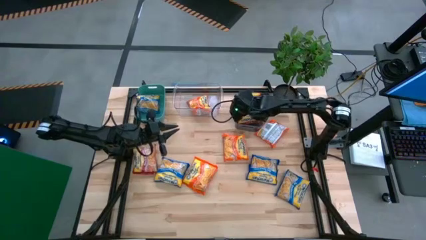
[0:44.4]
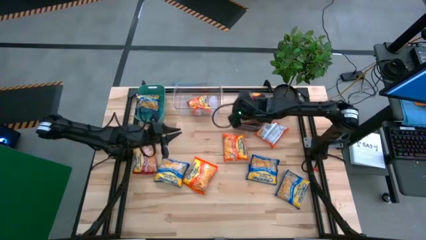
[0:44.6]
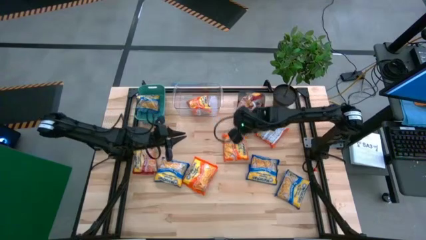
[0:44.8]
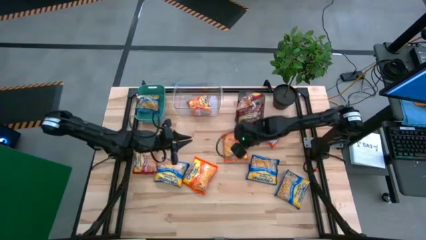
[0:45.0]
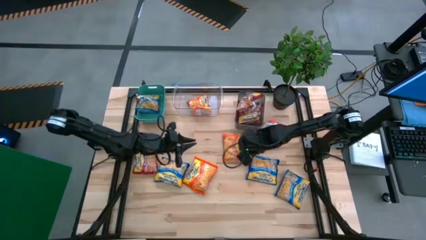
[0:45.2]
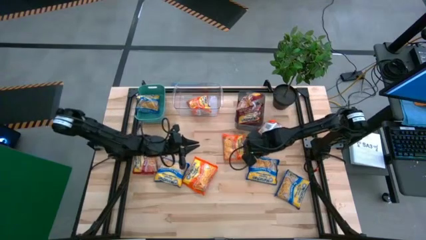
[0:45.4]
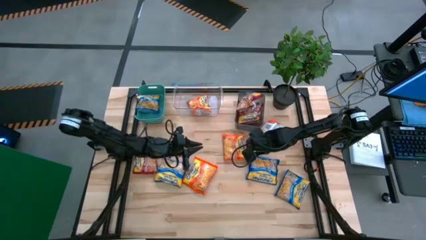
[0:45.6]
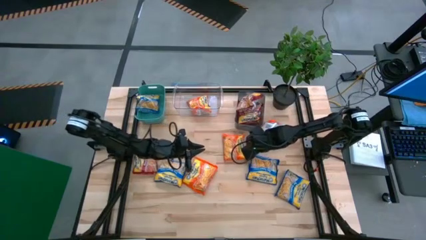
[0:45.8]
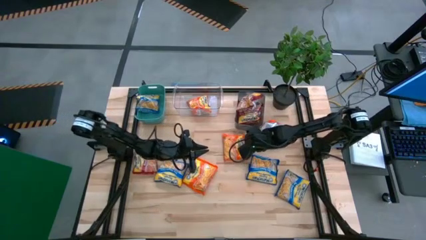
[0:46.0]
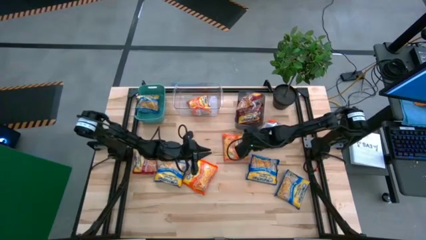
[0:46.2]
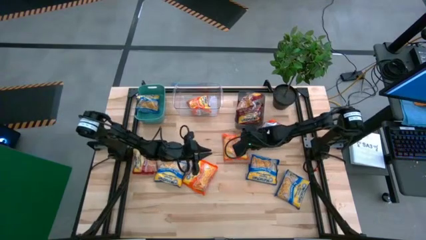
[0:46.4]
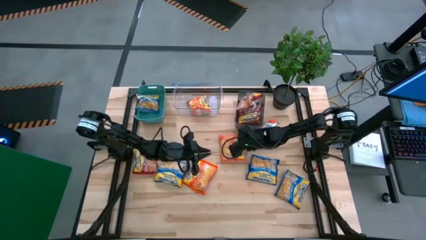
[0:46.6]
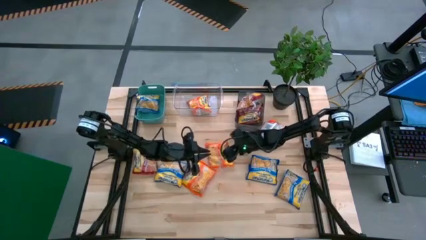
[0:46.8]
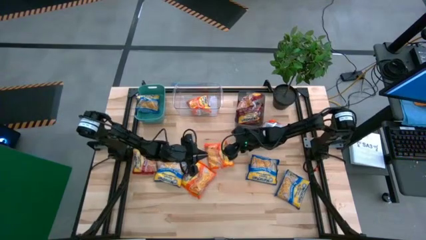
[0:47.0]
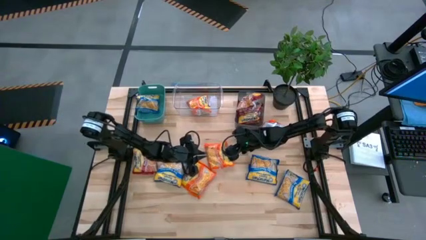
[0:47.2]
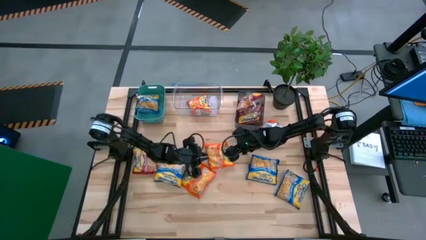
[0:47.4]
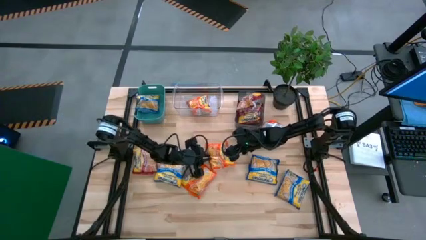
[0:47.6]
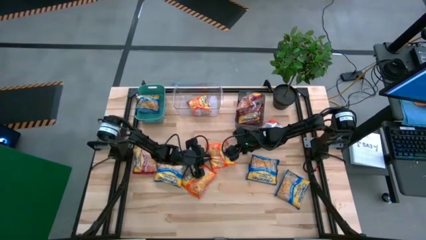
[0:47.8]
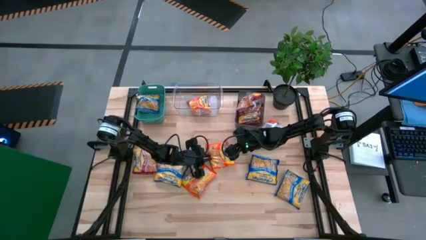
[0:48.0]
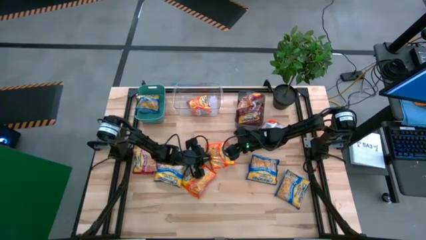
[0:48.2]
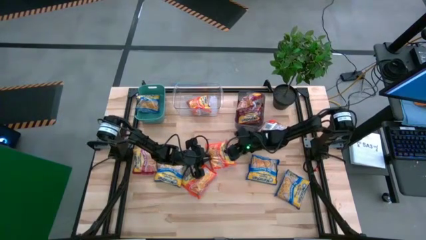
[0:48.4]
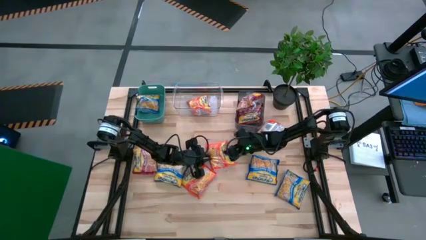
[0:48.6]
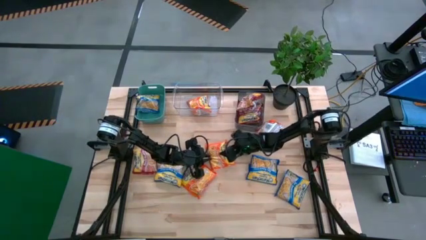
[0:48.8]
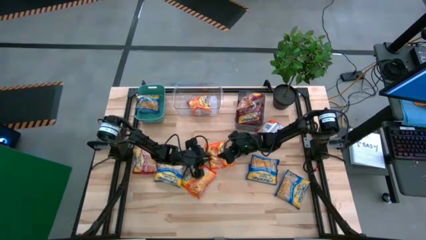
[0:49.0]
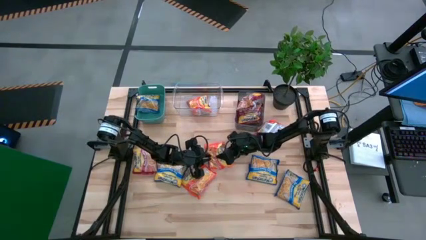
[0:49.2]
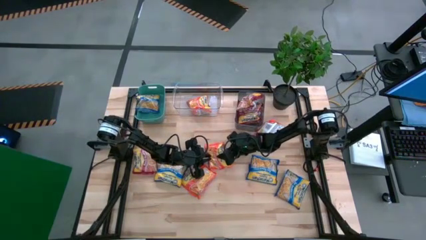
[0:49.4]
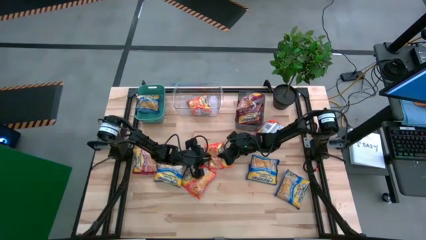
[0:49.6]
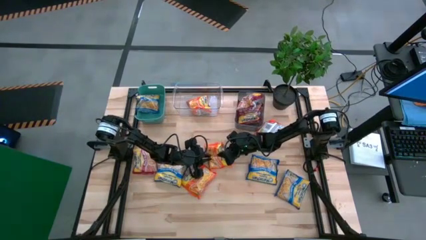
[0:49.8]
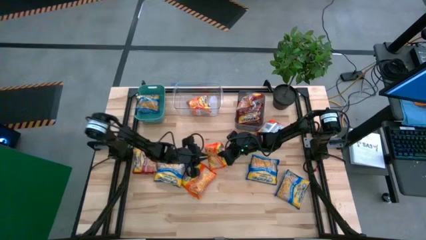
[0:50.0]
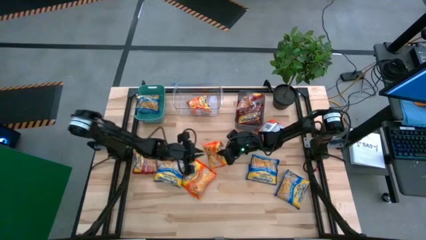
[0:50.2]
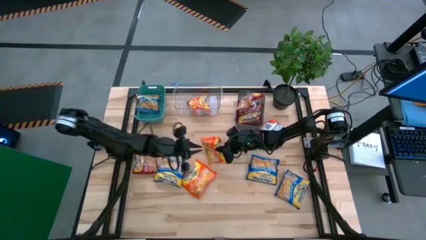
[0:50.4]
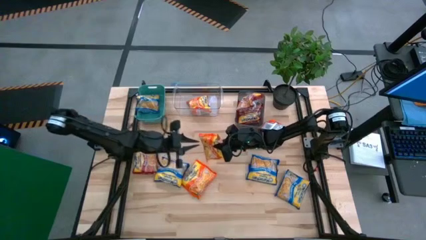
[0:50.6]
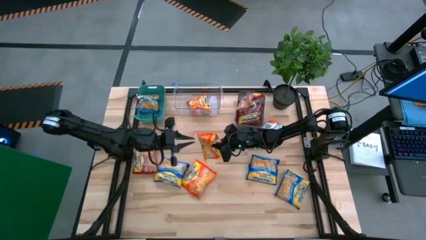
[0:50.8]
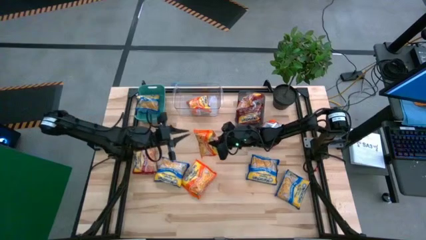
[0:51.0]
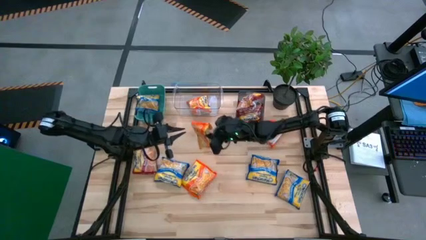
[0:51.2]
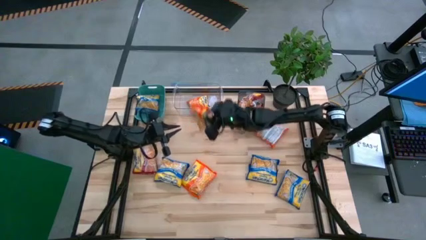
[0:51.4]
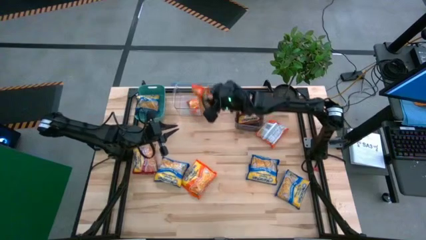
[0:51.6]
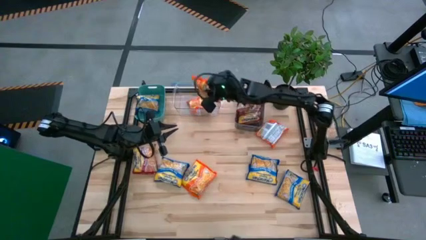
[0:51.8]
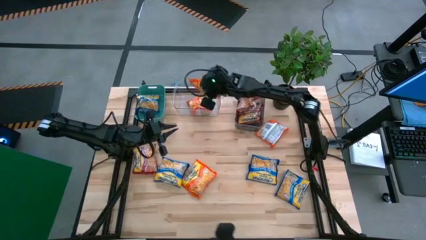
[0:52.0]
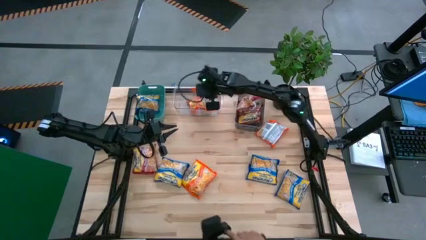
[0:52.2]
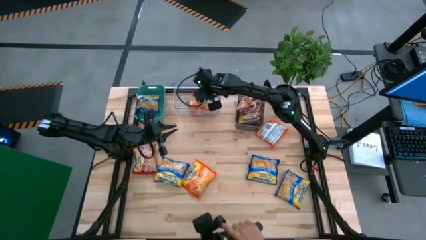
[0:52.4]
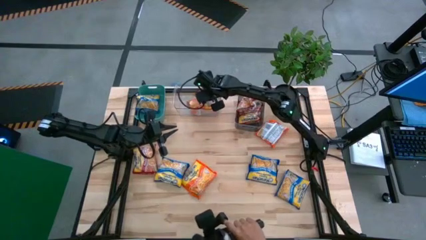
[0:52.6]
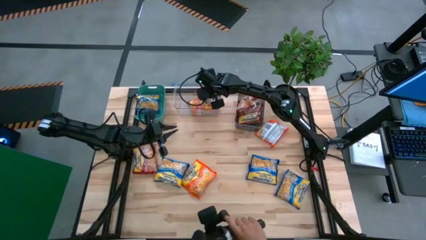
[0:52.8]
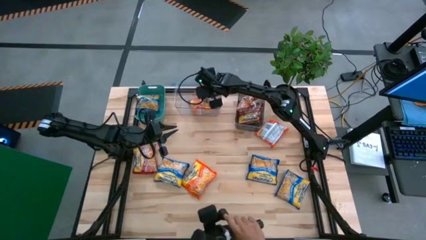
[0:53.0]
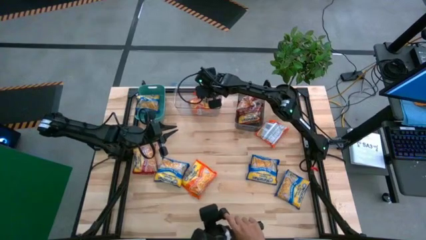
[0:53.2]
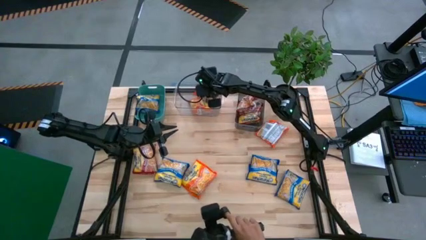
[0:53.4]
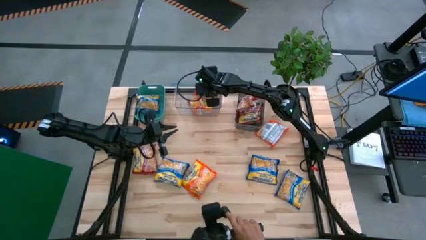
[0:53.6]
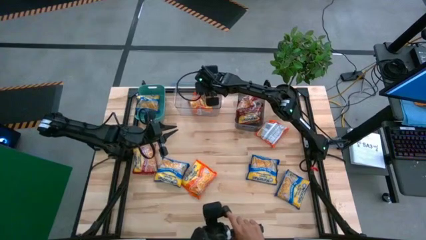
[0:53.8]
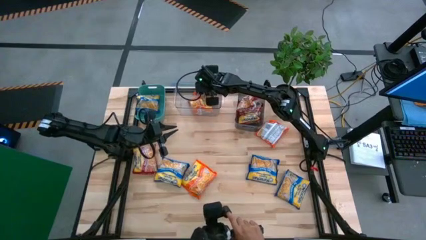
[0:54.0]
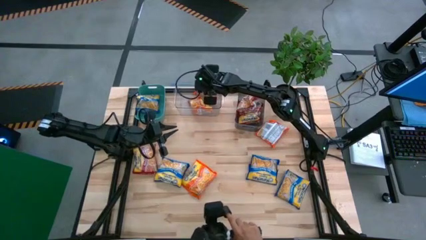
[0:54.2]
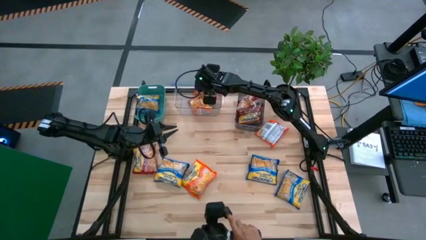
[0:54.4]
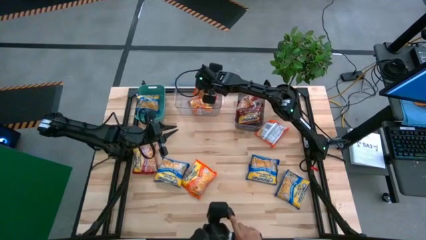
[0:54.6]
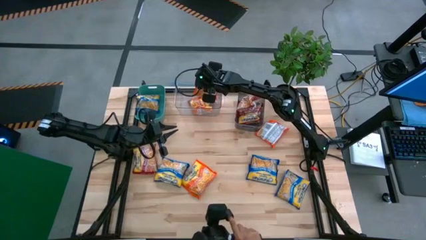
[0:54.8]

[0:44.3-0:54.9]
Task: Sort Maruchan noodles
Put the orange noodle pack into the transparent bin

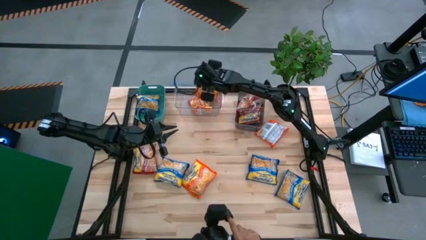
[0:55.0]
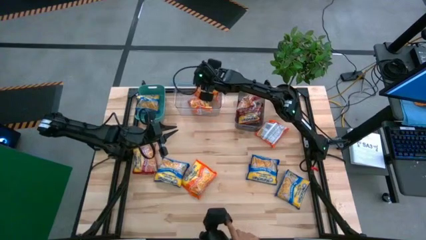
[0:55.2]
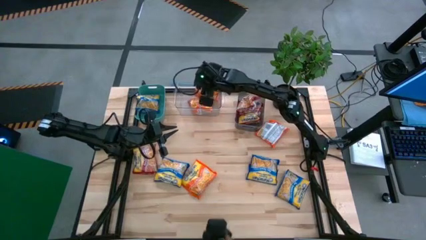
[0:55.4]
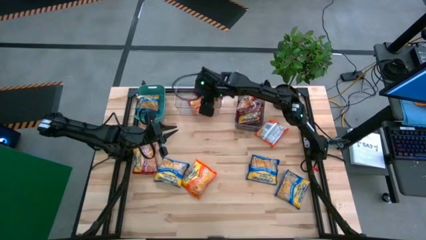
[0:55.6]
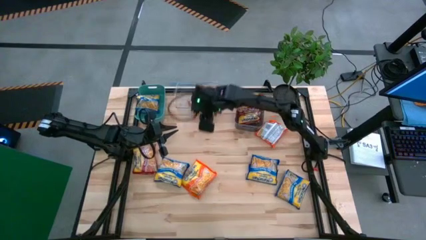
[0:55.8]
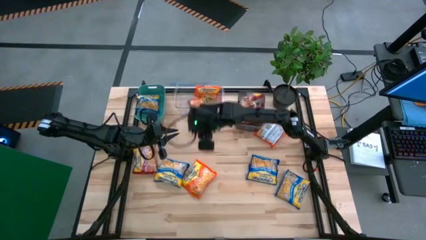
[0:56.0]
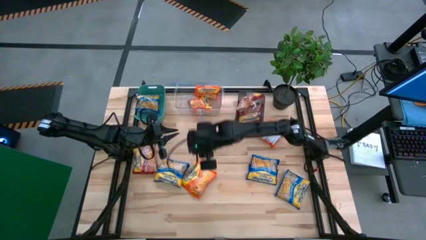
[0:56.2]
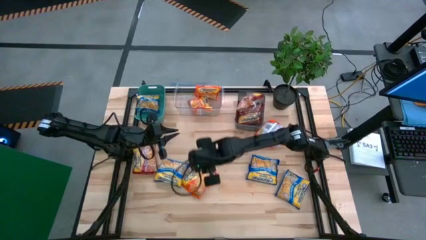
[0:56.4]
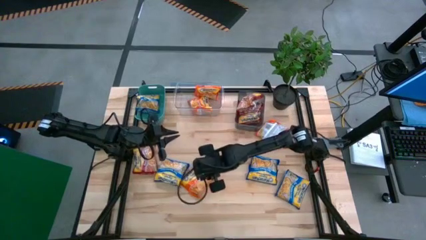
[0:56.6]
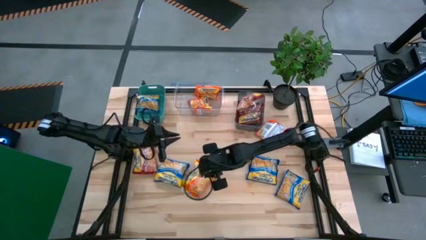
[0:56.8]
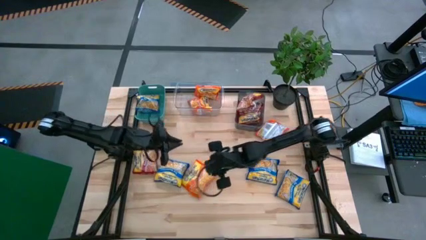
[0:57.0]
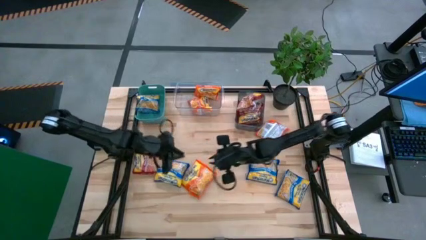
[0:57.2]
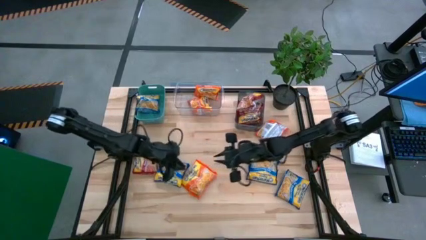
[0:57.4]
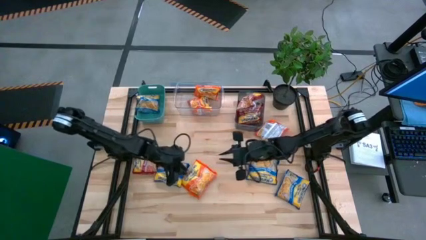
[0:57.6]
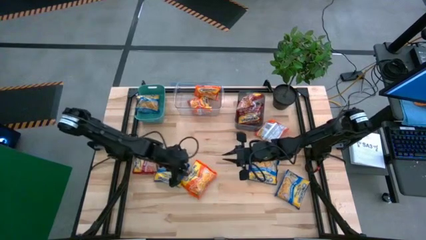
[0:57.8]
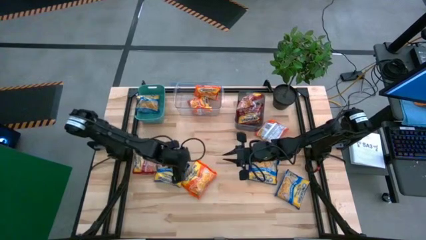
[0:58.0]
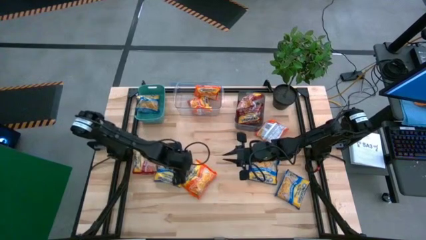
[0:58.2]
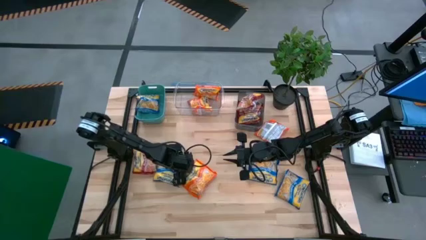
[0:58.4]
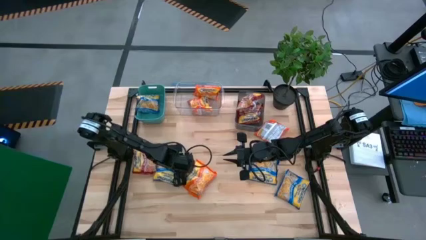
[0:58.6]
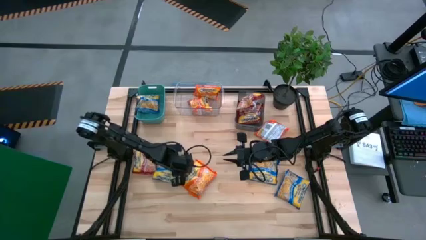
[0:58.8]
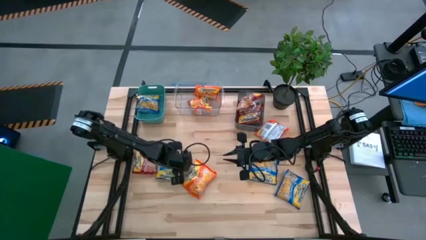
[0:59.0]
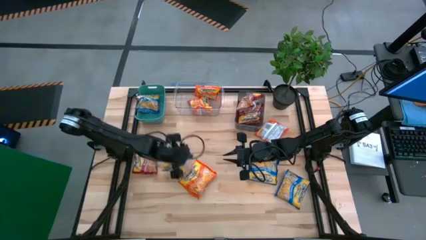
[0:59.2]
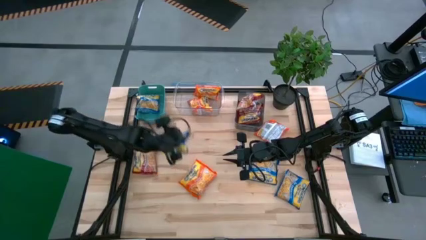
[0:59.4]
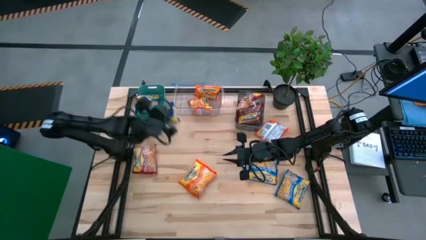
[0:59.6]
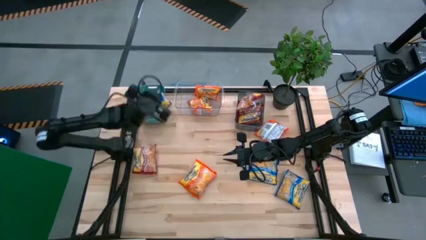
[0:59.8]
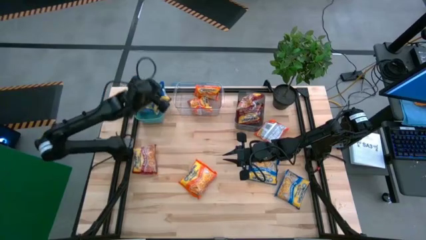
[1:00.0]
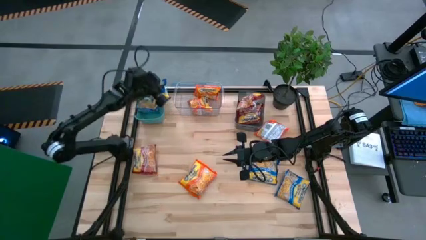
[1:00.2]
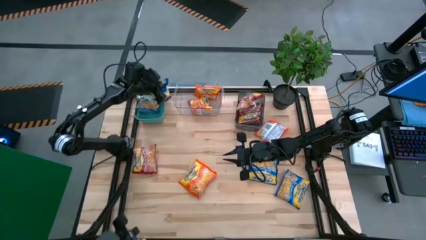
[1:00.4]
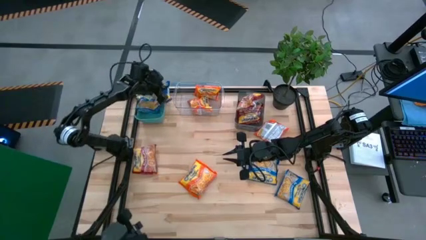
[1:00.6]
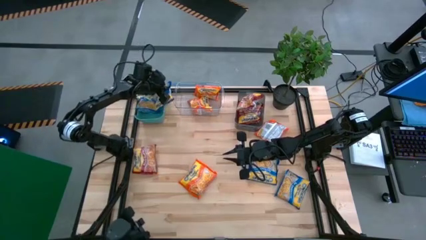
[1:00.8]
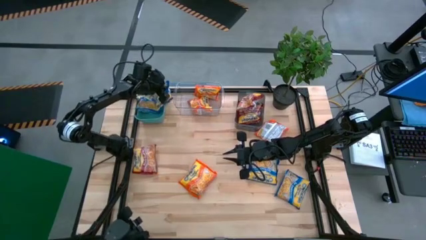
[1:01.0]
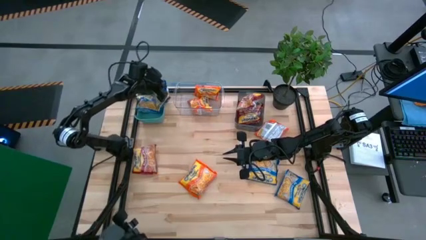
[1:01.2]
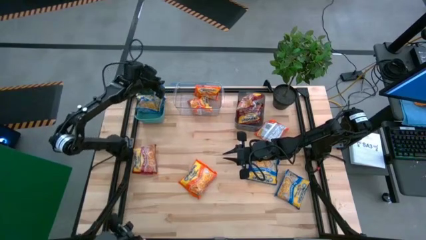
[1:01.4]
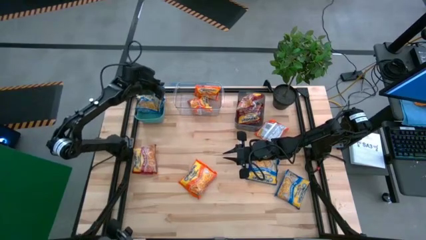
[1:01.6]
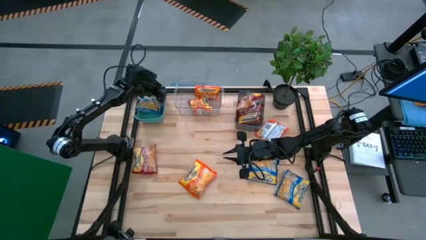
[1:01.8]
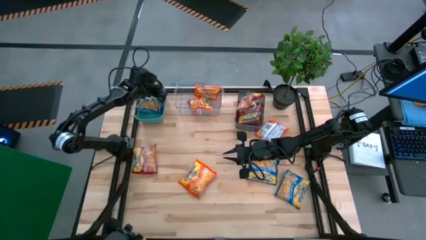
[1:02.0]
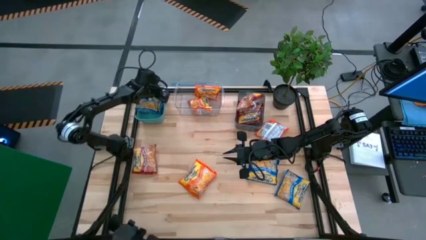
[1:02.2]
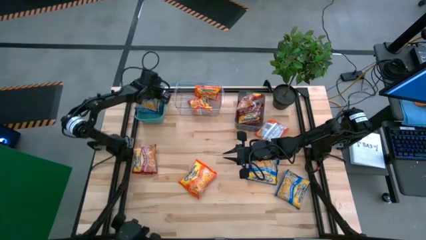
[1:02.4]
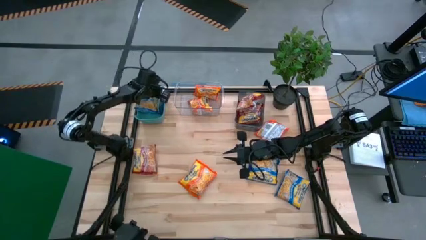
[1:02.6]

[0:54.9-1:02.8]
Put the blue noodle pack into the green bin
